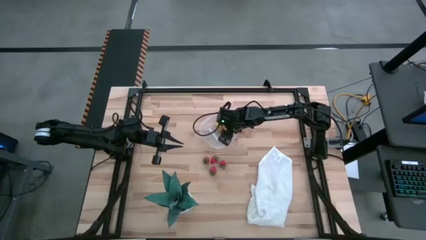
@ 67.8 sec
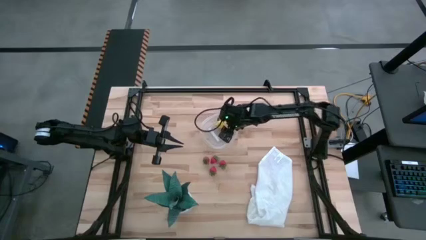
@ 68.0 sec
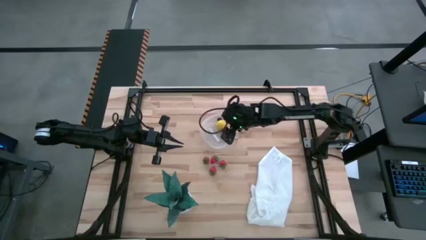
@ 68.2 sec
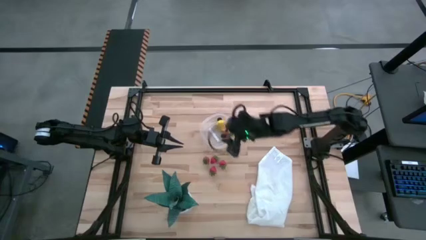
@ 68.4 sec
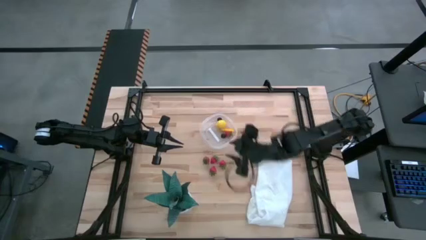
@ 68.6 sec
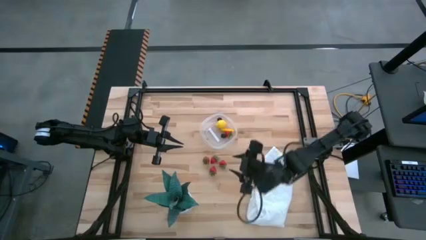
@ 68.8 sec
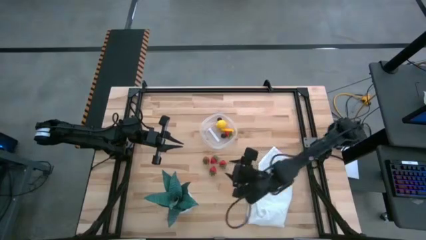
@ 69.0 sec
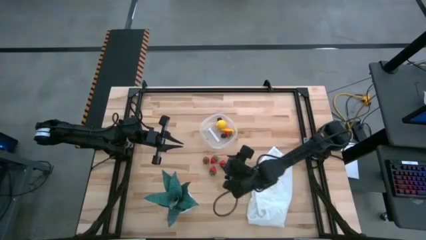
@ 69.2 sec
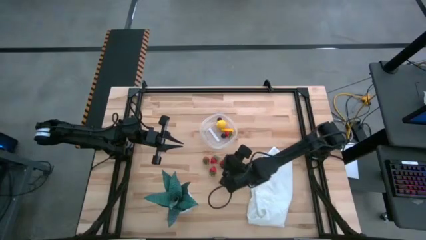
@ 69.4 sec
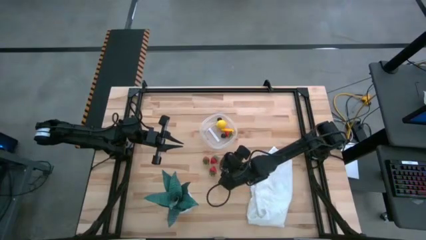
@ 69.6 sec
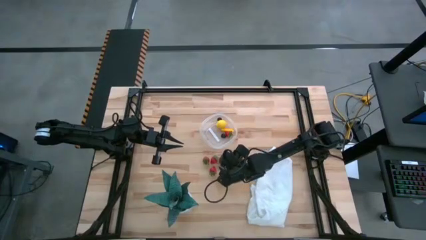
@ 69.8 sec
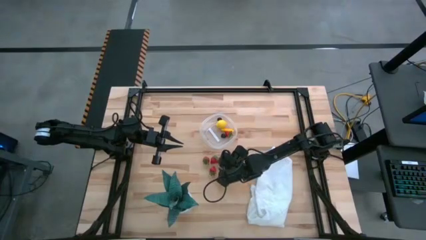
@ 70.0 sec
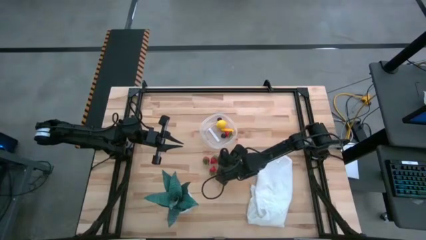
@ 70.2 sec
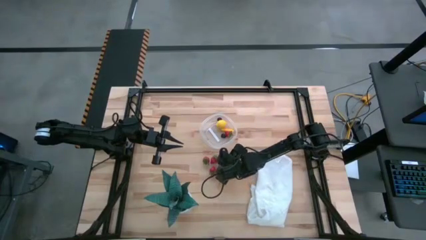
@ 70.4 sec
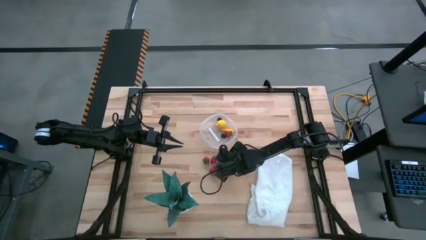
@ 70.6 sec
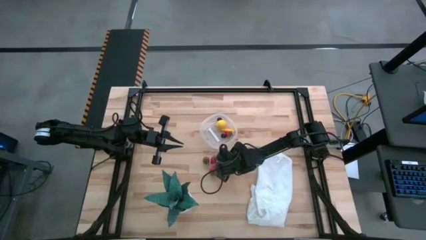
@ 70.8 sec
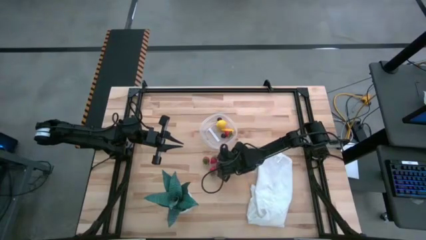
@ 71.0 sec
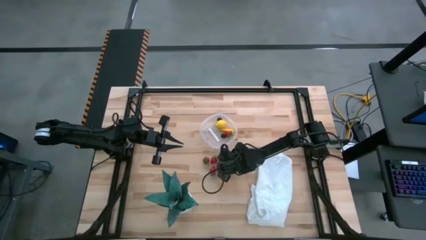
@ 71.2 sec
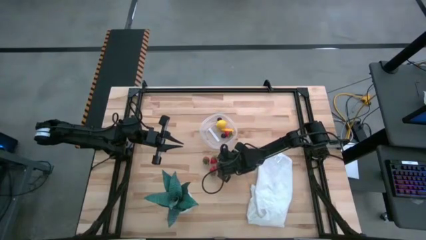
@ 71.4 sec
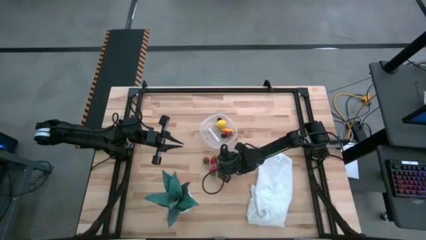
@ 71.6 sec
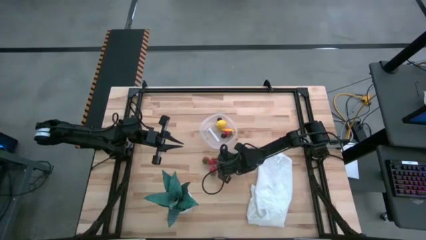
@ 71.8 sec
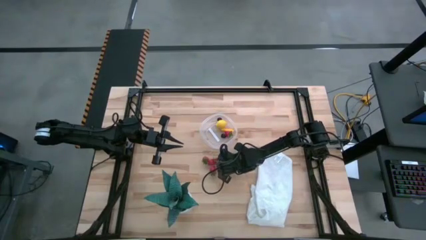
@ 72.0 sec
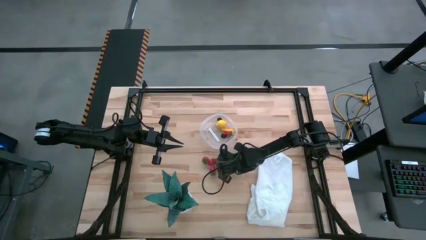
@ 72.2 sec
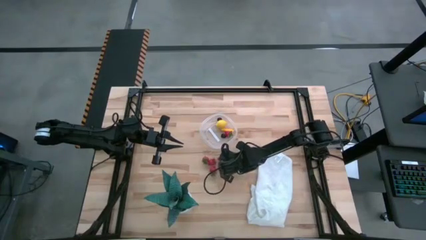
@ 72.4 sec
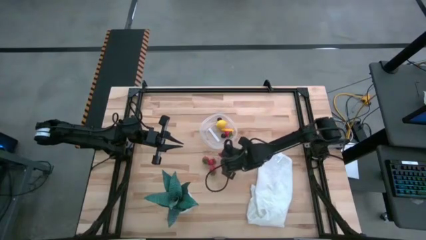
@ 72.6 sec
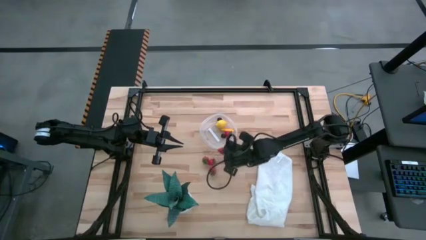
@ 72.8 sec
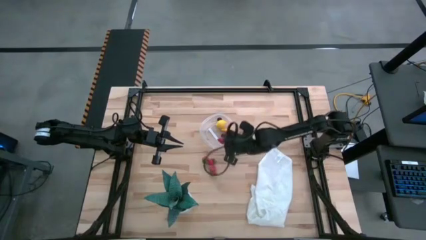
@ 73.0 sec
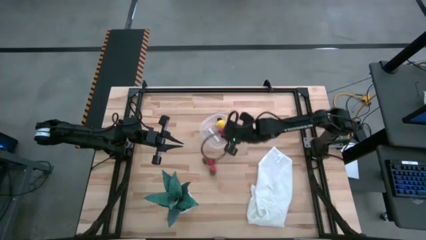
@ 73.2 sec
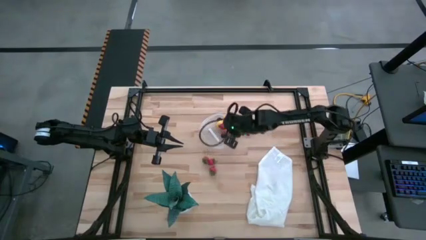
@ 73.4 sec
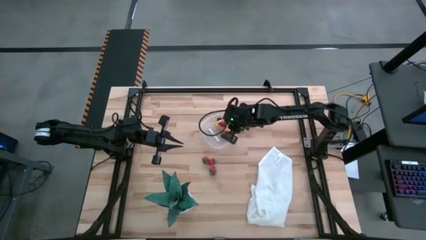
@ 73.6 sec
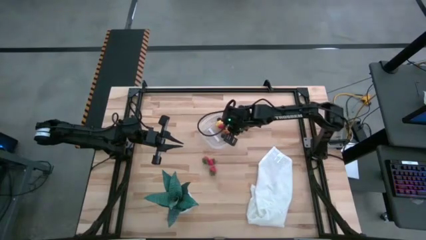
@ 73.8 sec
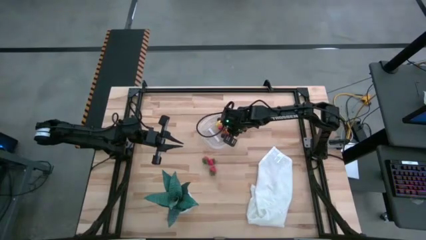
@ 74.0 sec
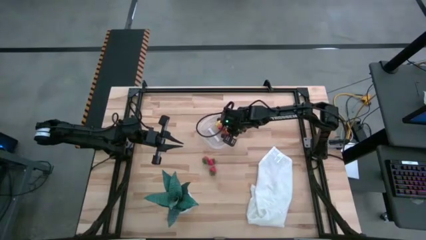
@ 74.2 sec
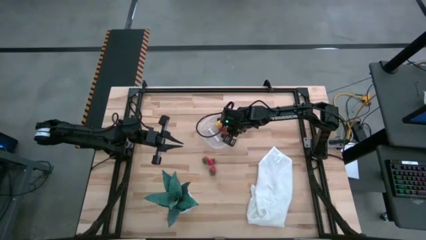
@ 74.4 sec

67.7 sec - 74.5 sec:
Task: Pick and placing Produce into tupperware
Put the strawberry into the bin

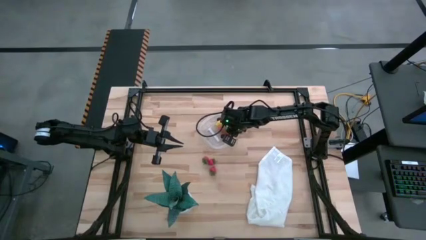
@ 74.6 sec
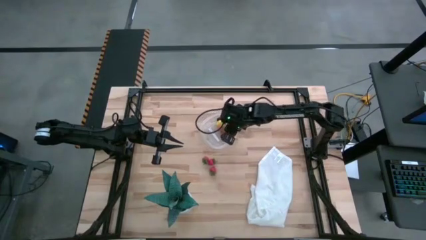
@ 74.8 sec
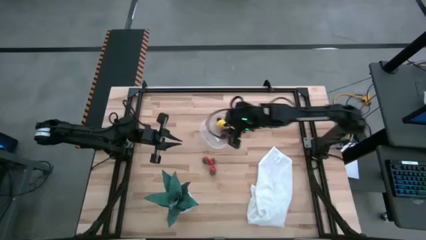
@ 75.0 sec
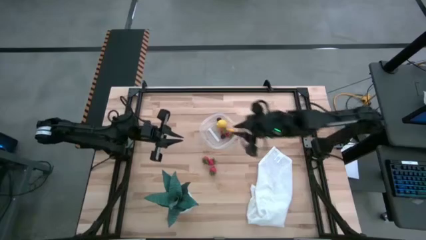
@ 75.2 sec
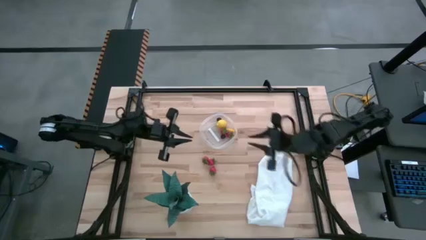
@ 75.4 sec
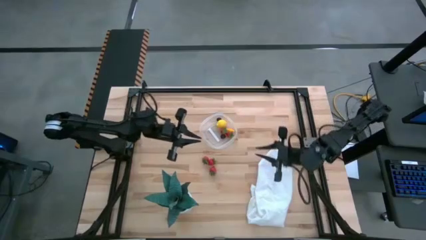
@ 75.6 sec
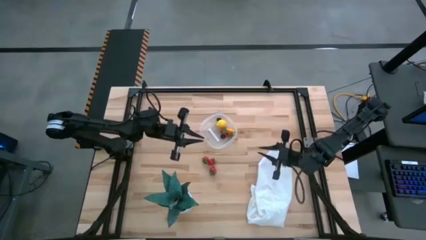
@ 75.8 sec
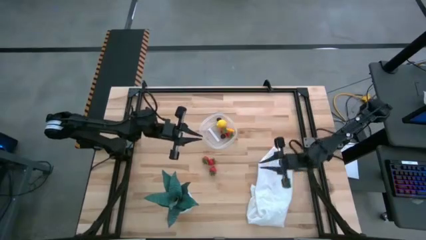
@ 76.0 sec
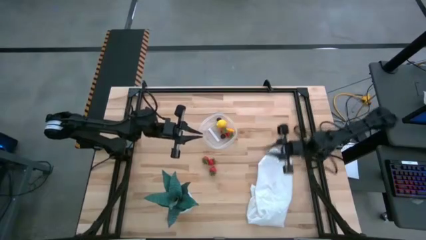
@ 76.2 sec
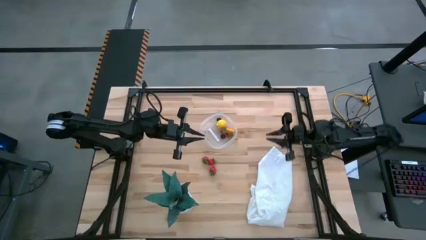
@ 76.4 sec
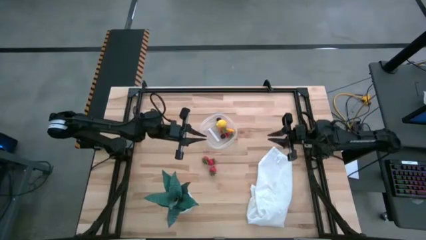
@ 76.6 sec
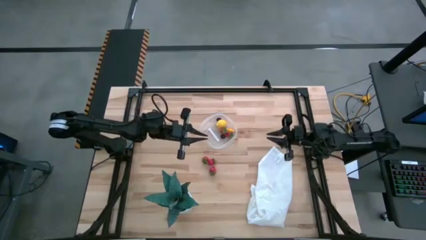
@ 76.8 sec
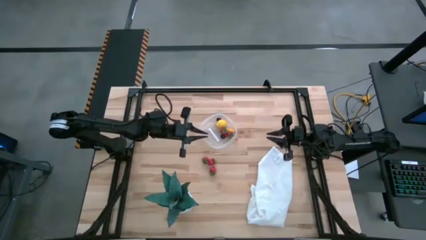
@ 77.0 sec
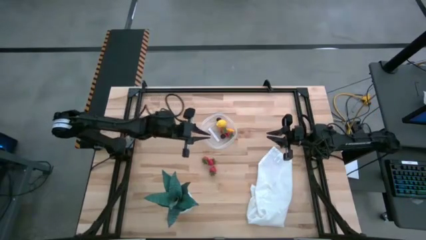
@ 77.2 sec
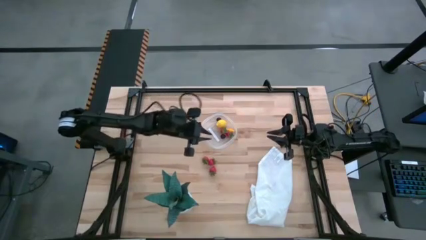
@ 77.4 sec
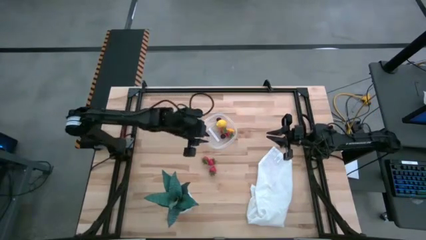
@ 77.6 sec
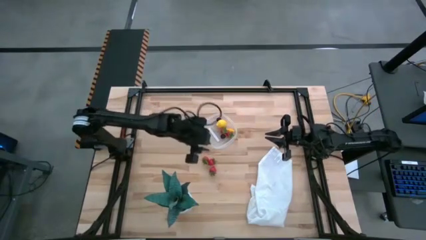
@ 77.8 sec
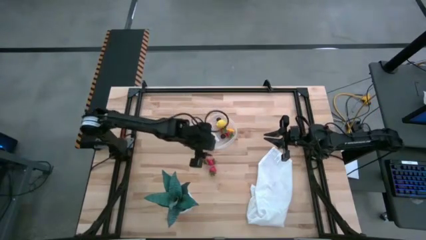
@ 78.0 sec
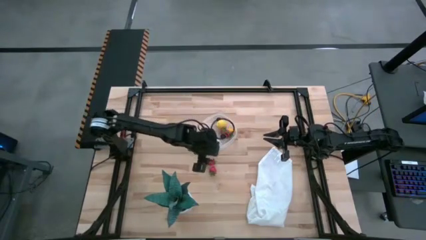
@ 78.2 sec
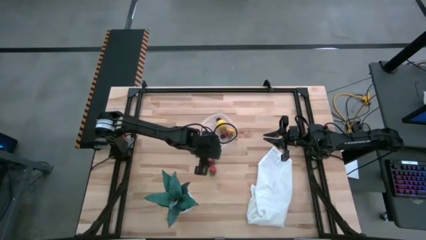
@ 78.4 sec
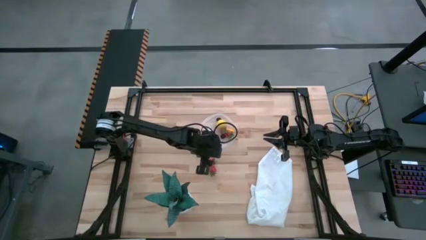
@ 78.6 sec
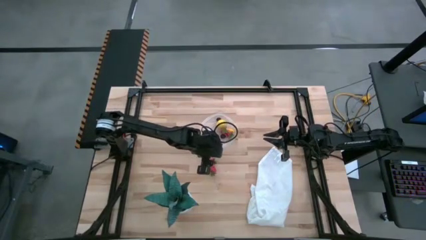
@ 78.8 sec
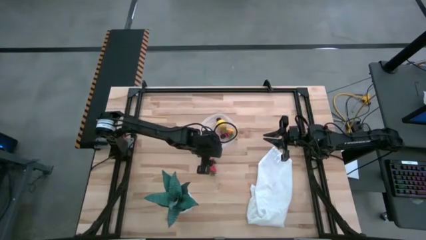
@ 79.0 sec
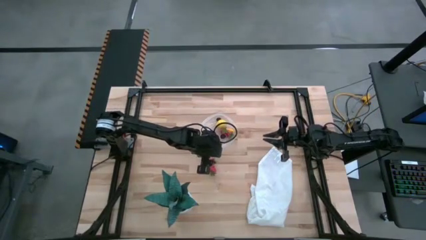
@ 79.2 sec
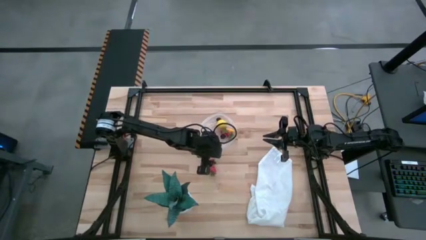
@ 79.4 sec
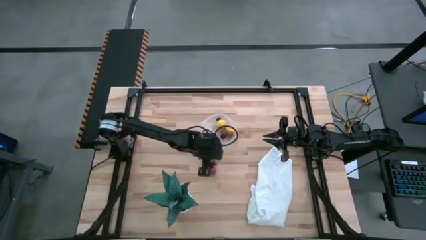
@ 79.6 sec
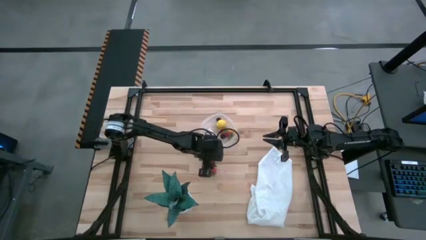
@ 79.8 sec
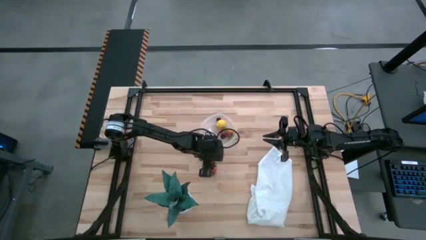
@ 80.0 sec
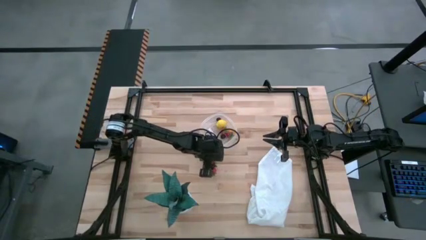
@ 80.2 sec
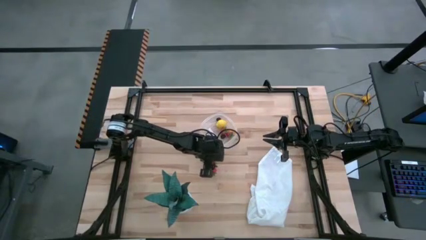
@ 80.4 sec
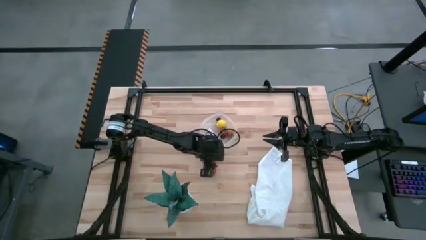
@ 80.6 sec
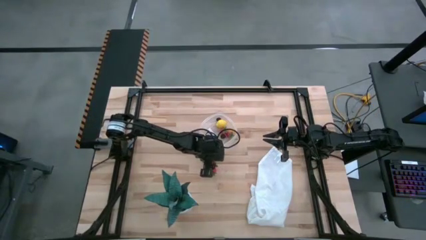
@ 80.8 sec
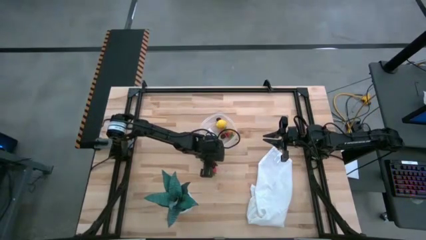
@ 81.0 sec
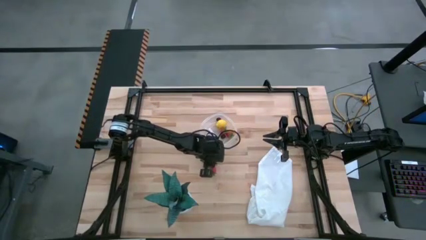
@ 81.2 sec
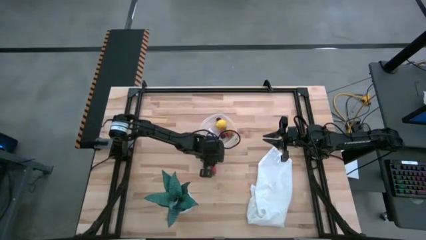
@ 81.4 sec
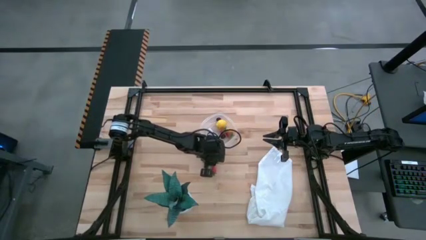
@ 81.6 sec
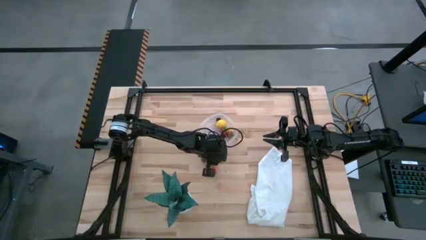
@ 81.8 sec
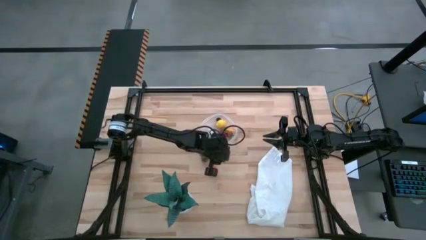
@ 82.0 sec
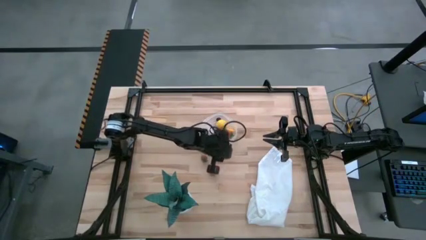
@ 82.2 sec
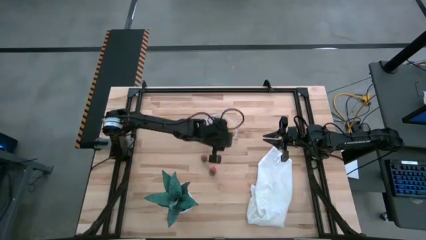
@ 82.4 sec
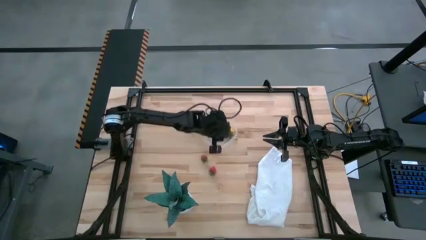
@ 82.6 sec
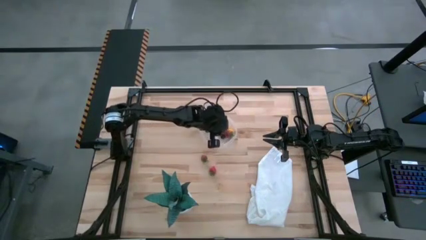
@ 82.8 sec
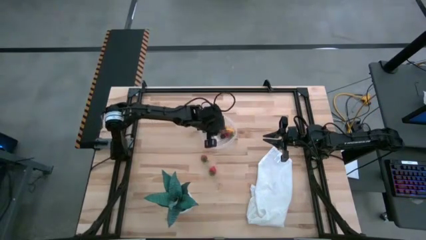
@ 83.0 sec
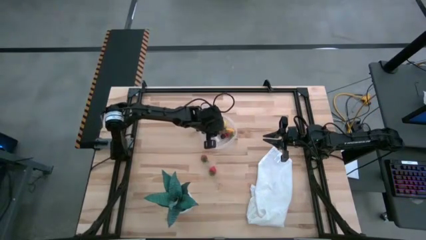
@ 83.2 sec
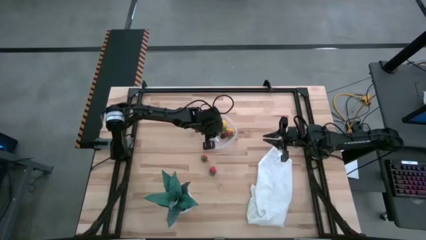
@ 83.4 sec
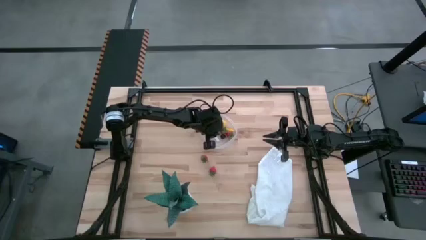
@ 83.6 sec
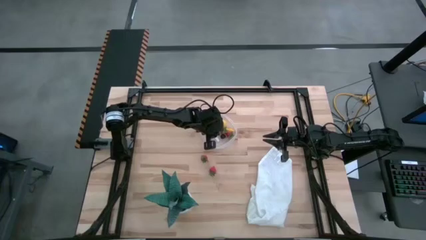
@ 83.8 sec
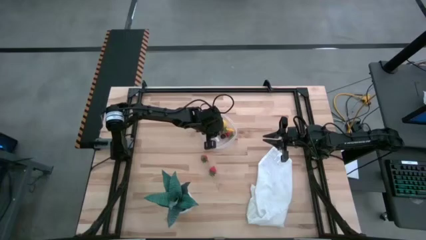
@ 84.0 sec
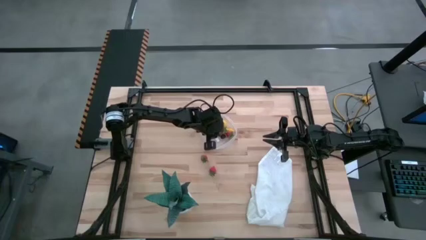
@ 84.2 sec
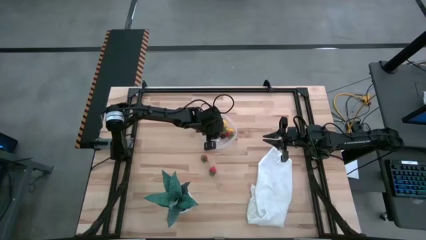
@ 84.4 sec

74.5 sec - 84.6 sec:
Put the strawberry into the bin
